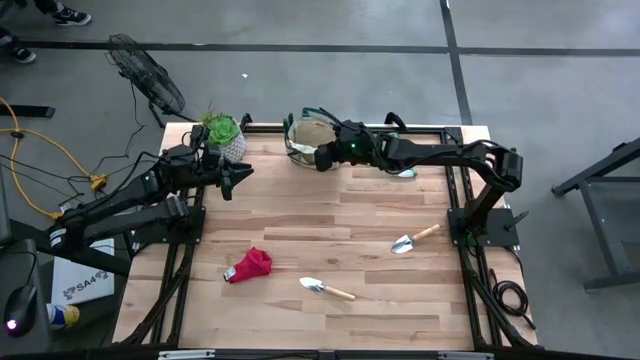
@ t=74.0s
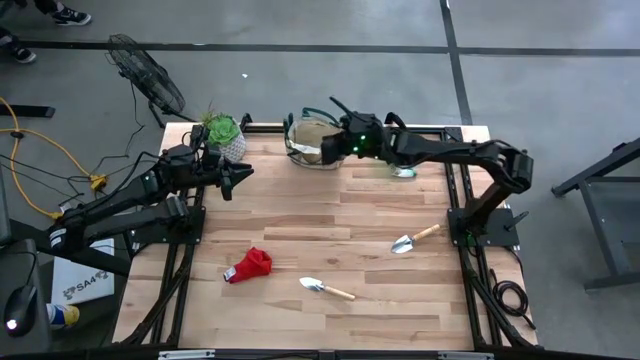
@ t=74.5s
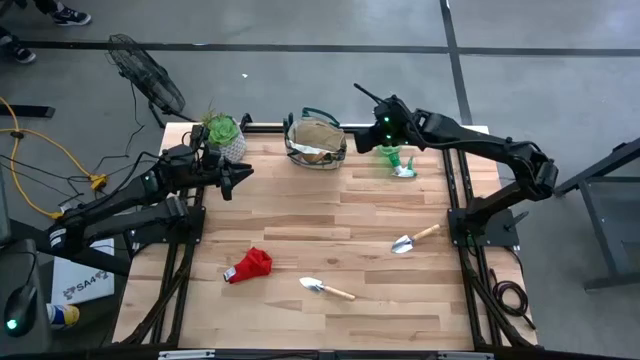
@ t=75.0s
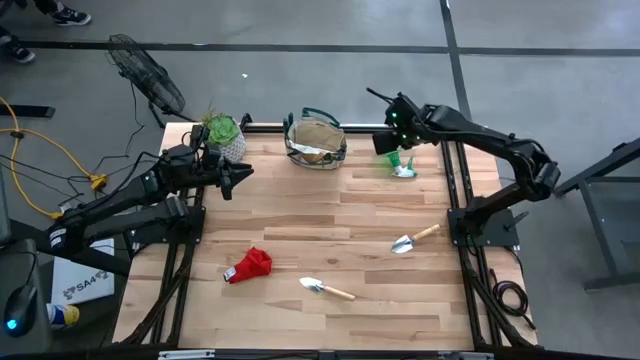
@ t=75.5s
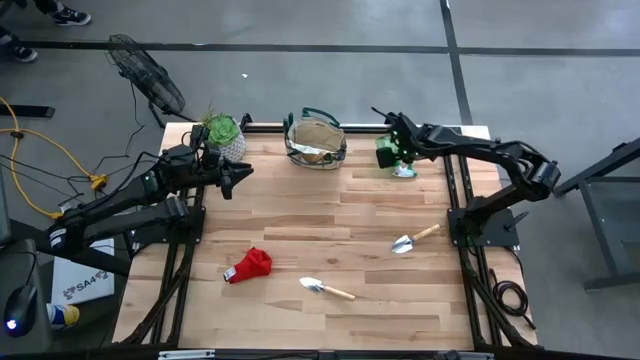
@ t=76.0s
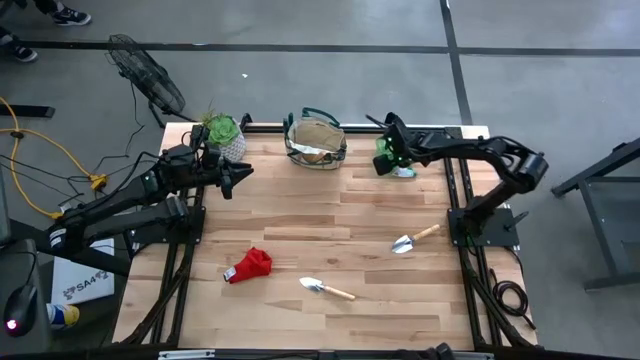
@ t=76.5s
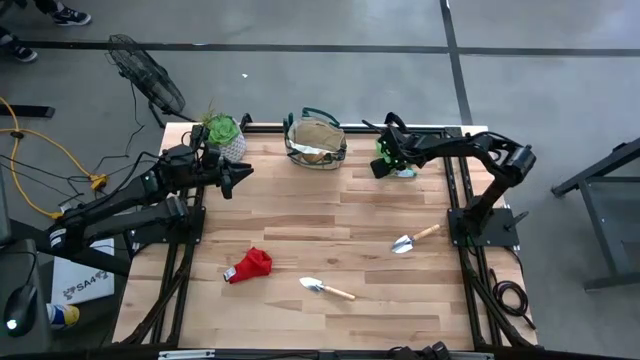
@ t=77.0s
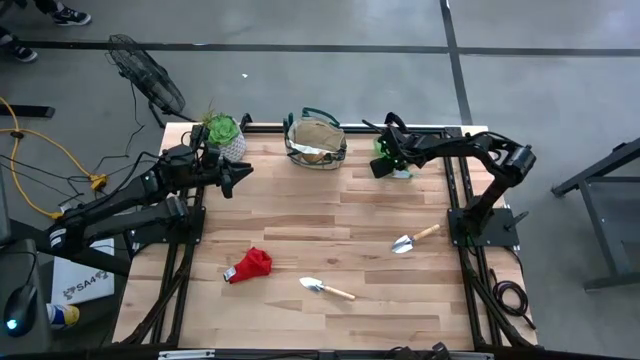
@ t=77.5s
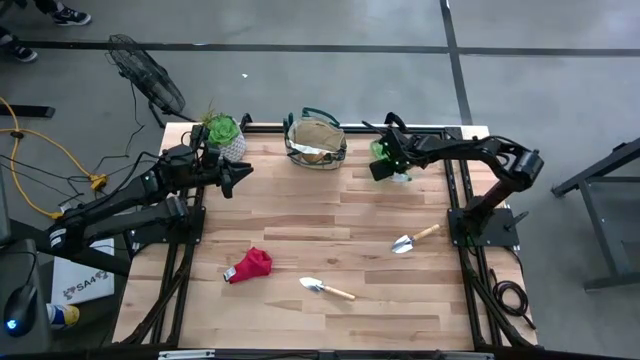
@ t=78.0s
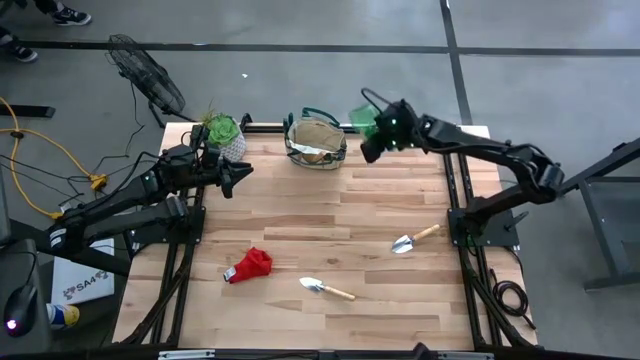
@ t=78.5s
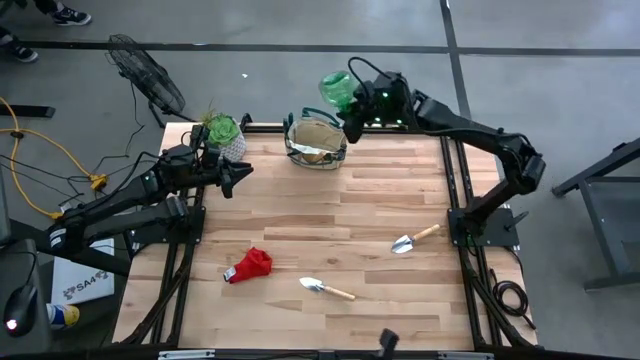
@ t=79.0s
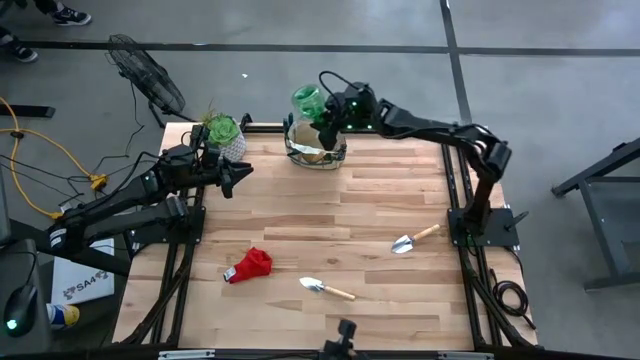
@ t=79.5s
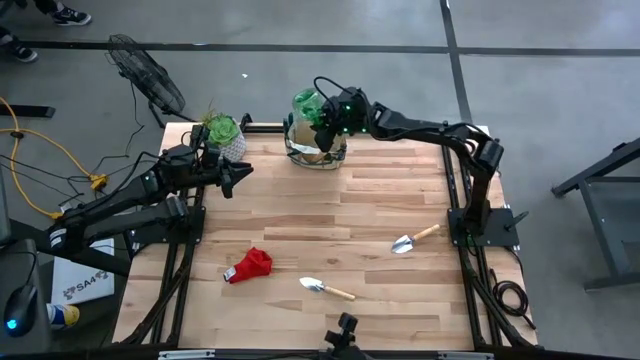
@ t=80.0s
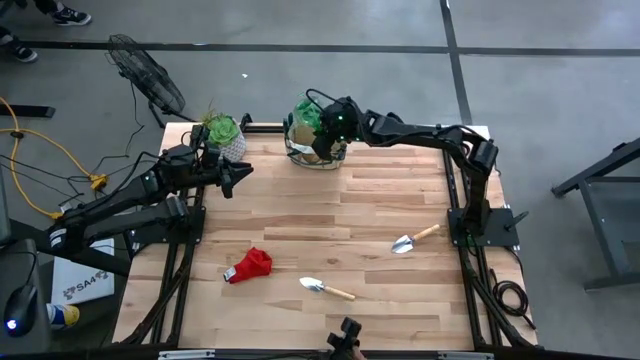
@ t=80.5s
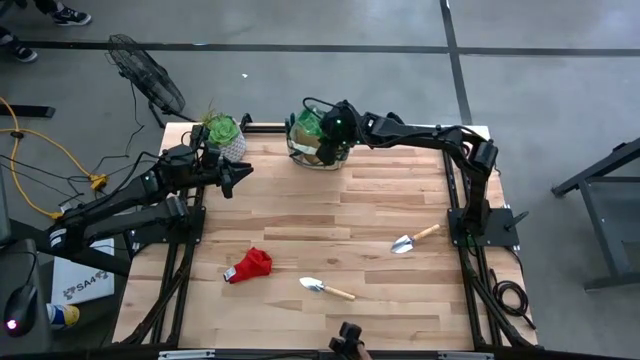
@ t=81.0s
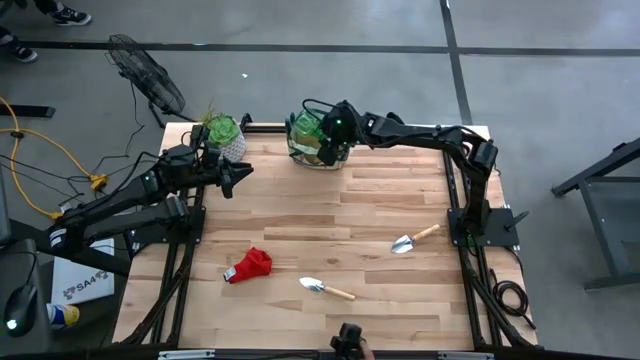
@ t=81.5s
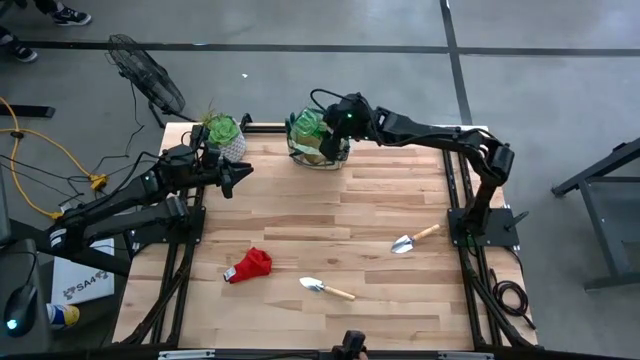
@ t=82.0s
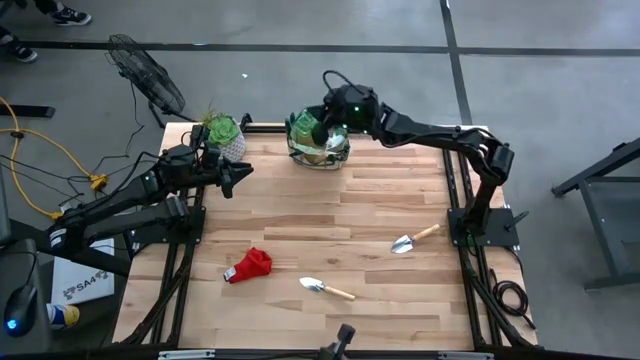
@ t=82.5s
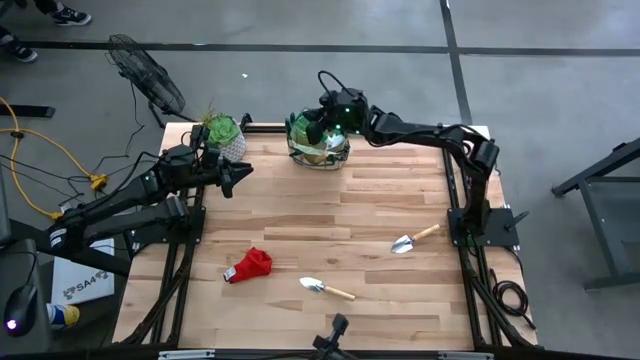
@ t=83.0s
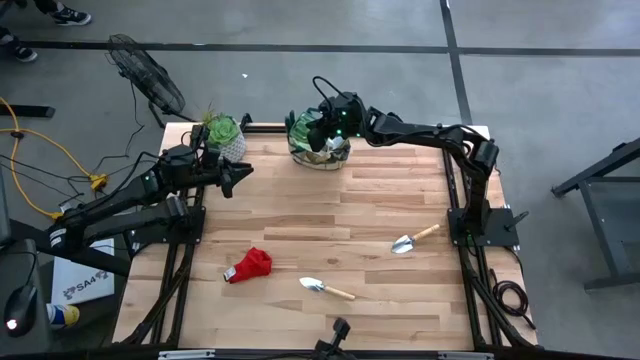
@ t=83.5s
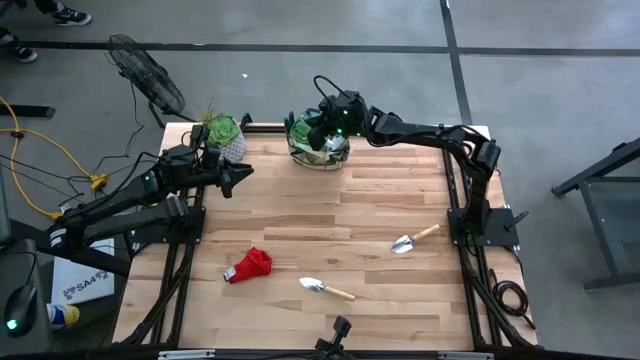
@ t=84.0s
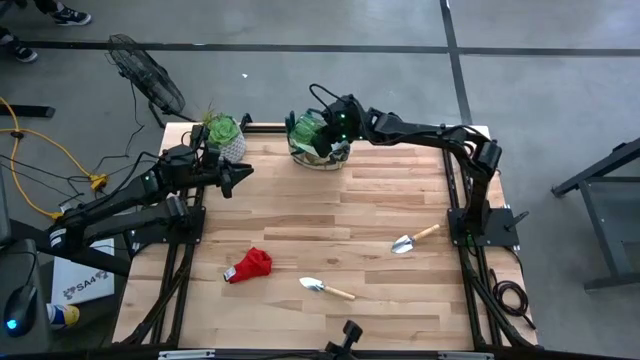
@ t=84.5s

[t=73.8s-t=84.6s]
Task: Pick & Place Garden tools in Gardening bag
Put the spray bottle into the gardening bag

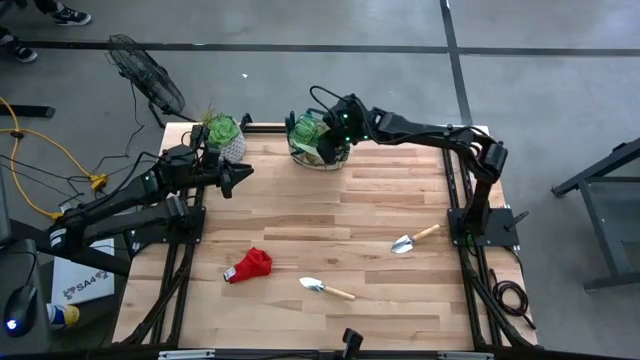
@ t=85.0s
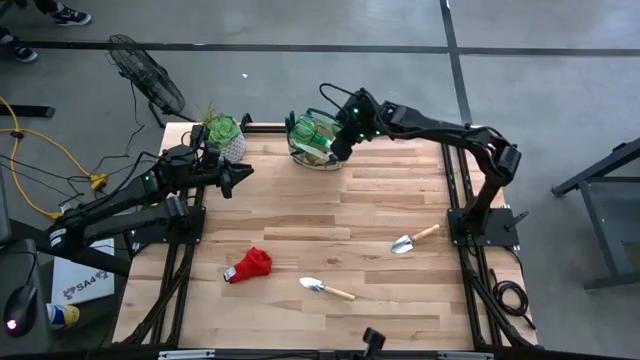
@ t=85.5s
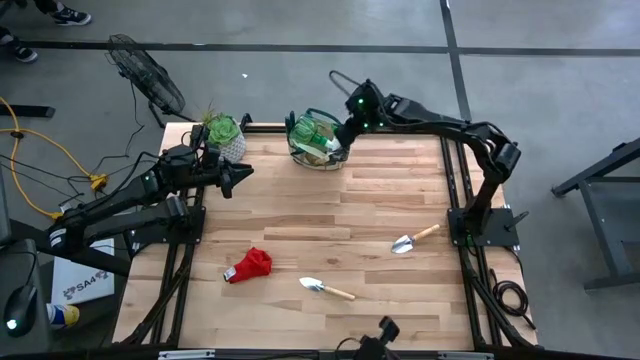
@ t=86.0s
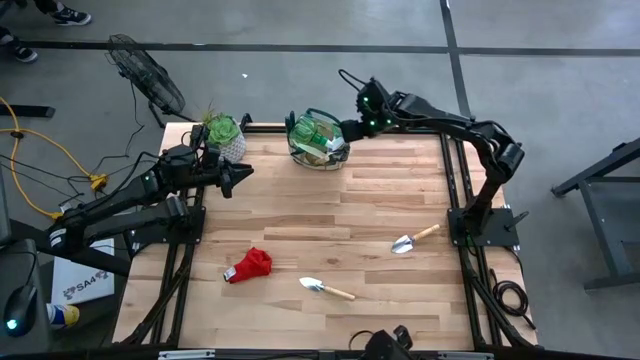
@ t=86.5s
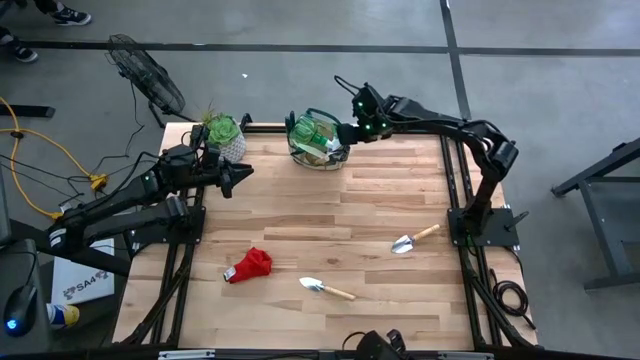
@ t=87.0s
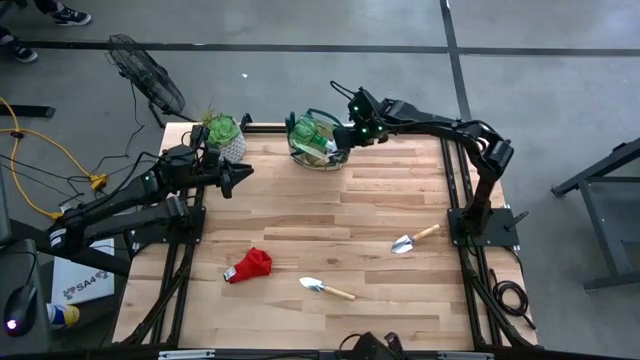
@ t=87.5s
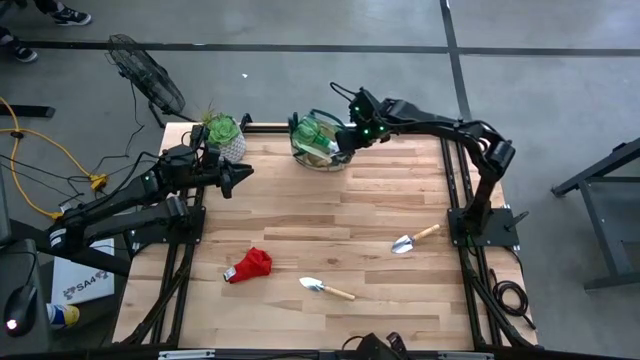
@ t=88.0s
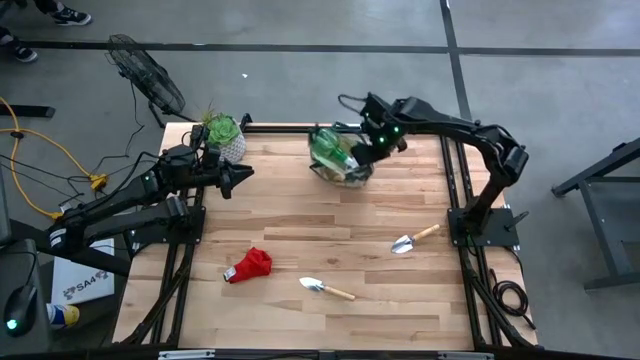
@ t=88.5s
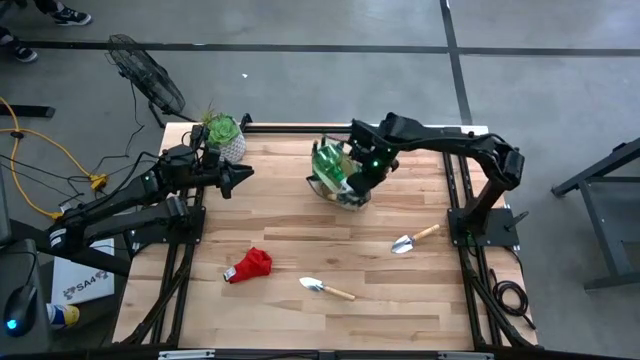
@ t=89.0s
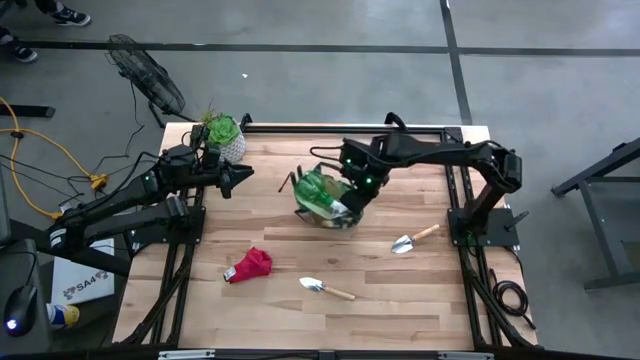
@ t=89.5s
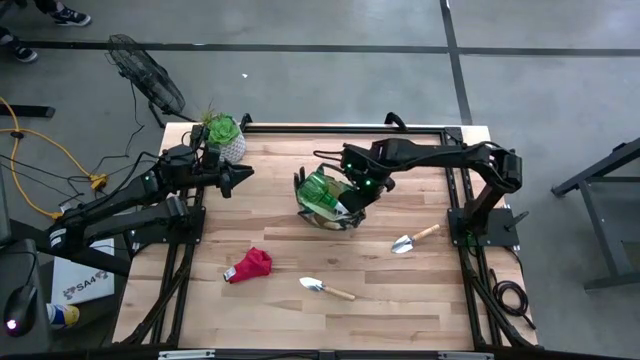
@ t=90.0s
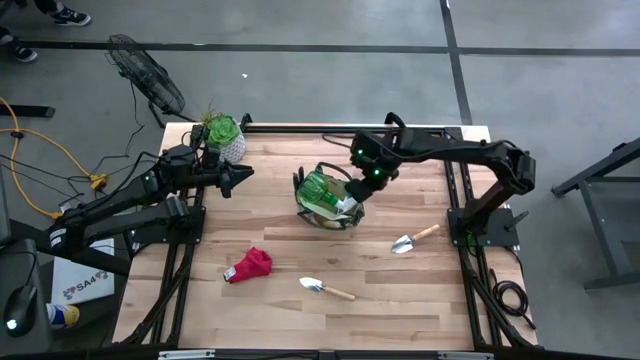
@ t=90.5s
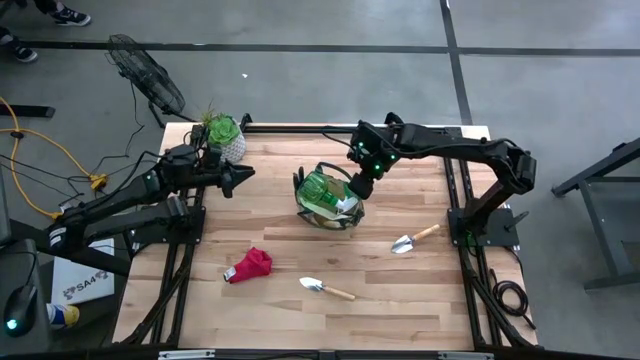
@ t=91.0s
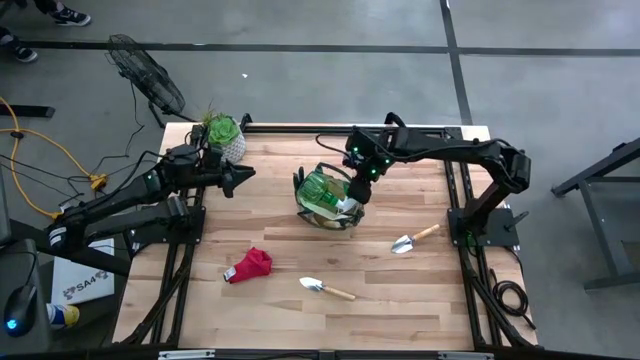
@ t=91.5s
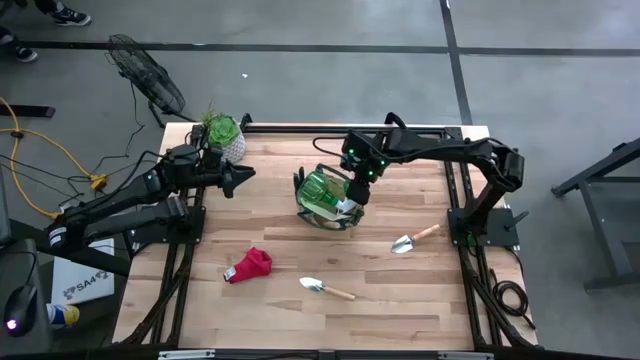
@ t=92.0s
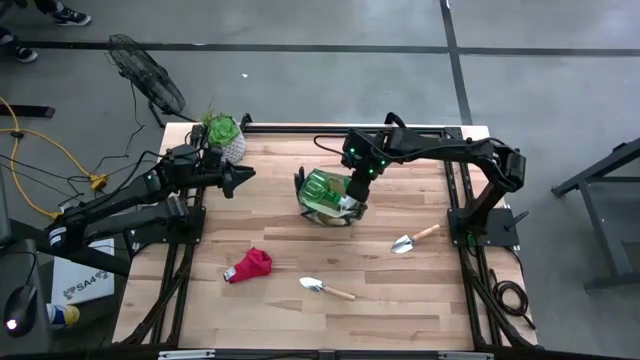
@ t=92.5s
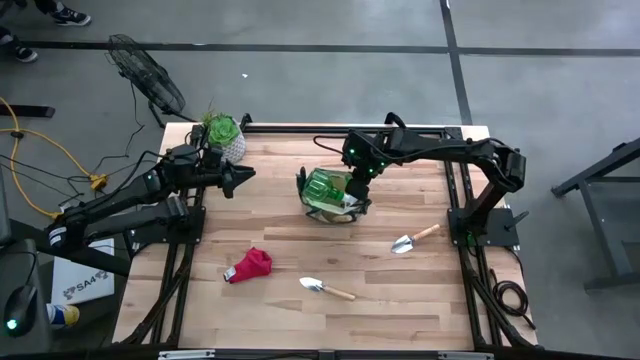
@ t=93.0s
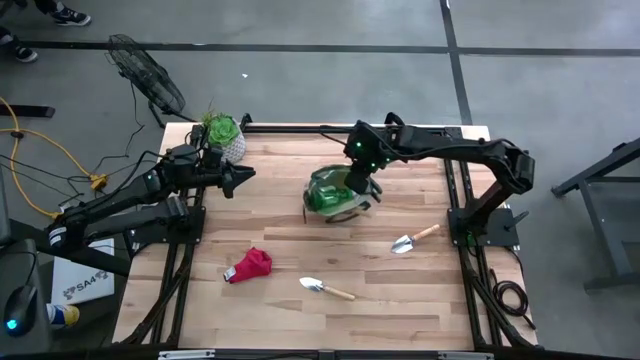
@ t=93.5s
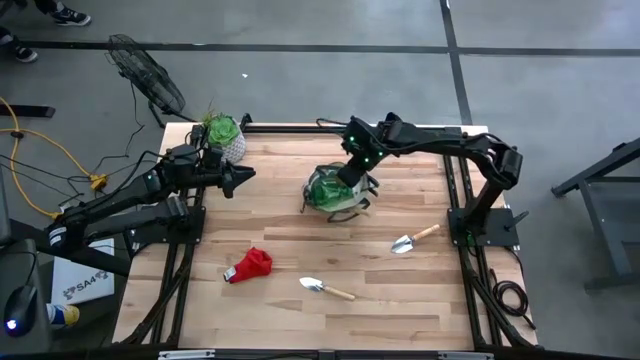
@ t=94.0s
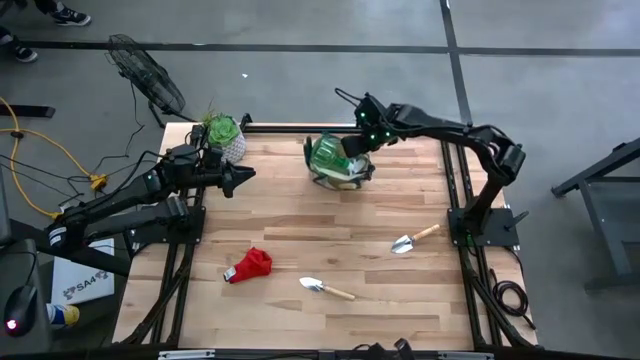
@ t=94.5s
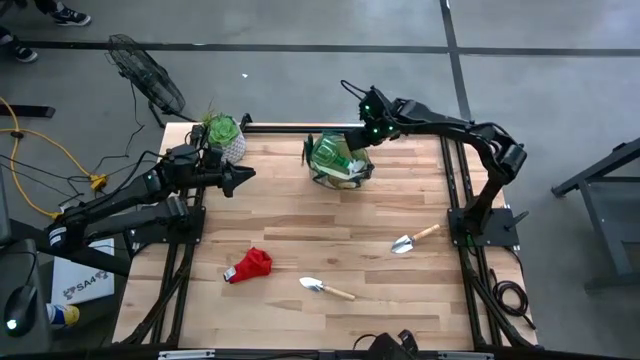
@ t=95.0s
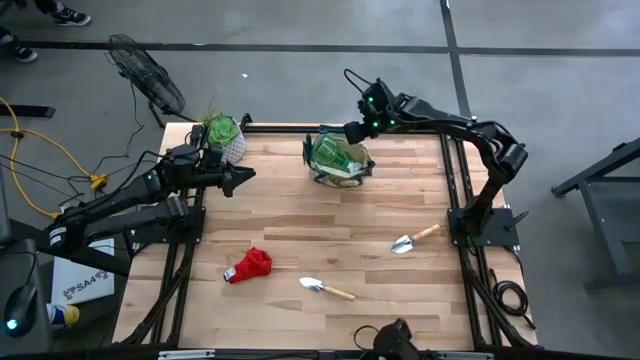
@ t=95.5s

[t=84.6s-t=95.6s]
Adjust the gardening bag on the table

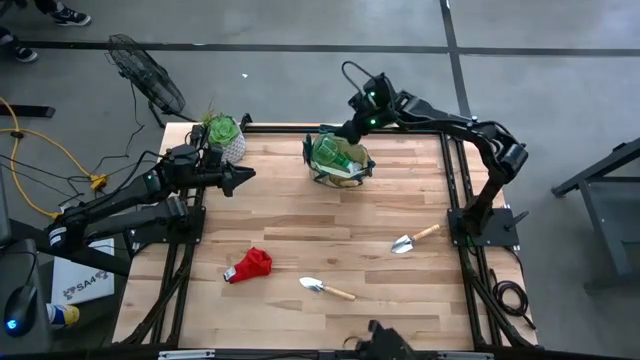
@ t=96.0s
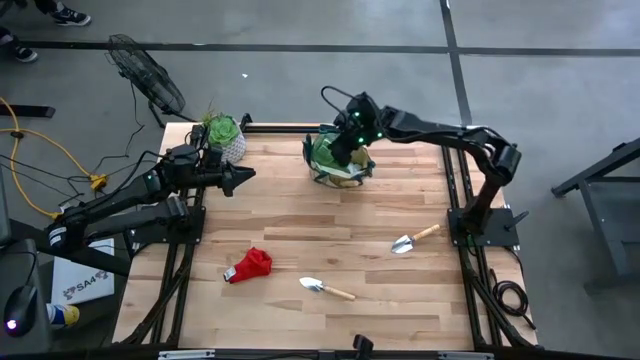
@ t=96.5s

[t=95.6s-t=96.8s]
Adjust the spray bottle in the gardening bag
